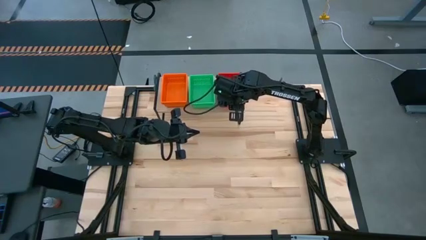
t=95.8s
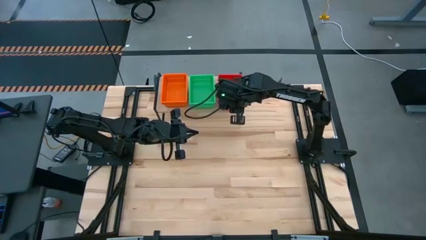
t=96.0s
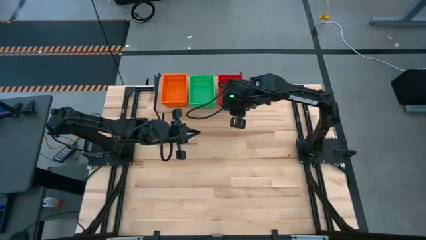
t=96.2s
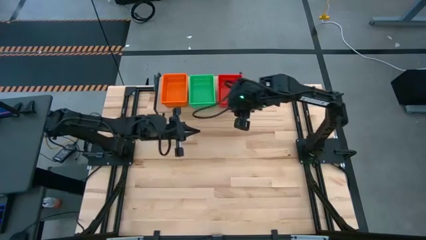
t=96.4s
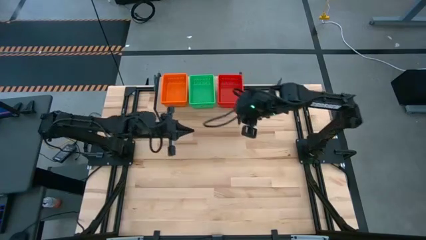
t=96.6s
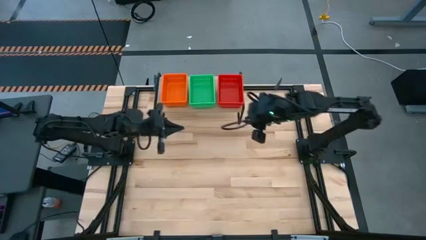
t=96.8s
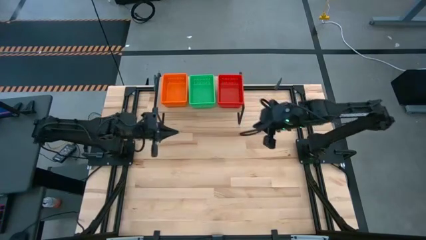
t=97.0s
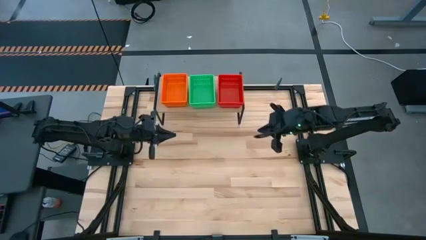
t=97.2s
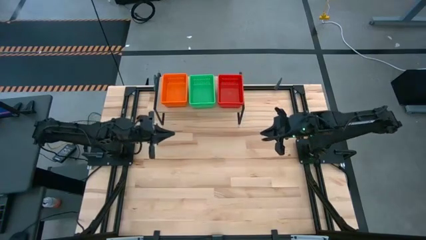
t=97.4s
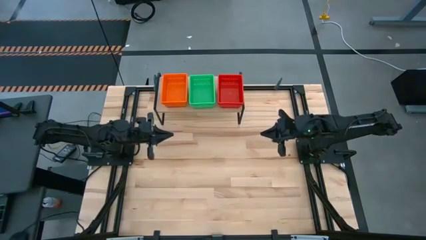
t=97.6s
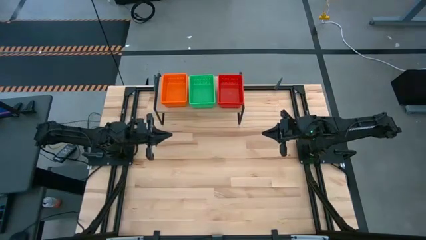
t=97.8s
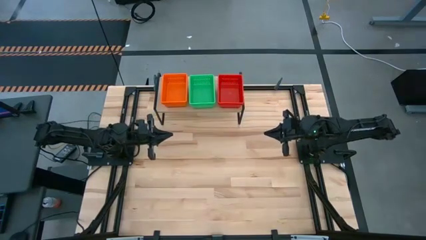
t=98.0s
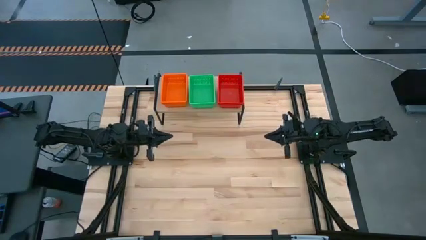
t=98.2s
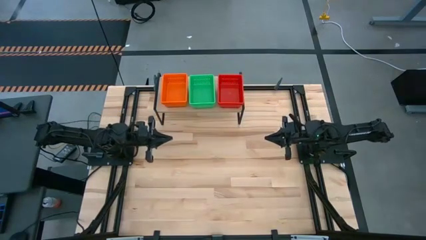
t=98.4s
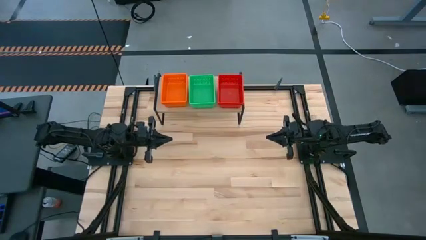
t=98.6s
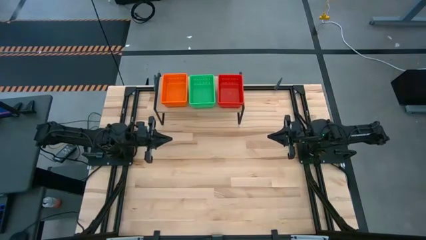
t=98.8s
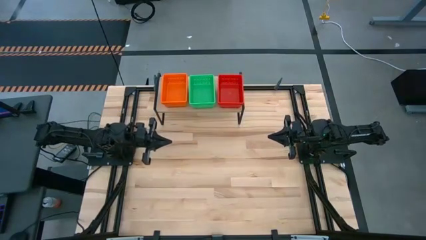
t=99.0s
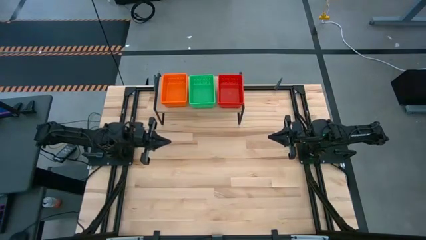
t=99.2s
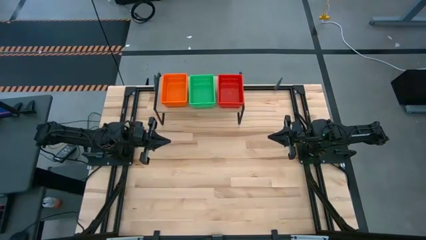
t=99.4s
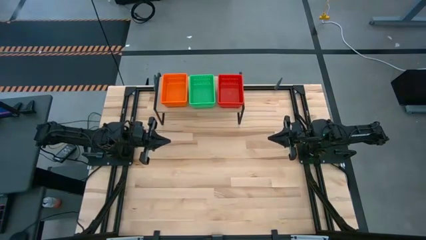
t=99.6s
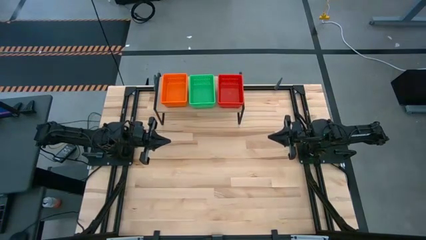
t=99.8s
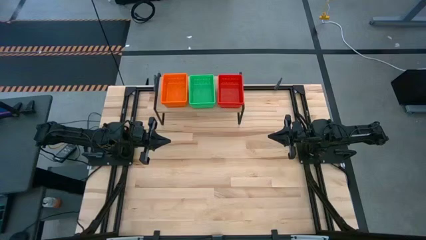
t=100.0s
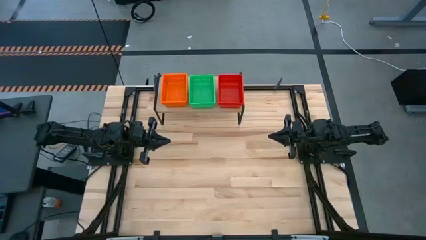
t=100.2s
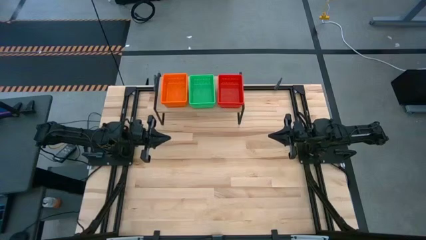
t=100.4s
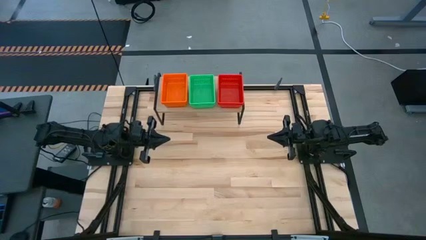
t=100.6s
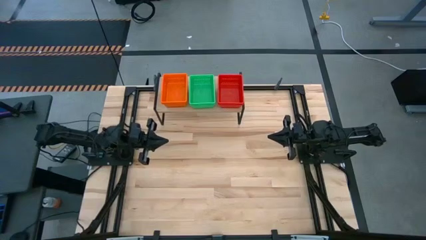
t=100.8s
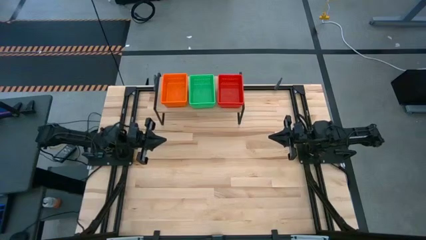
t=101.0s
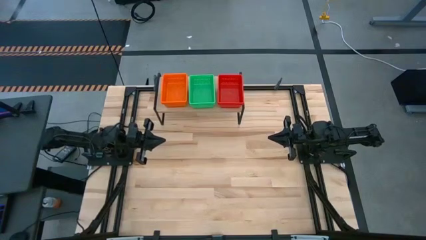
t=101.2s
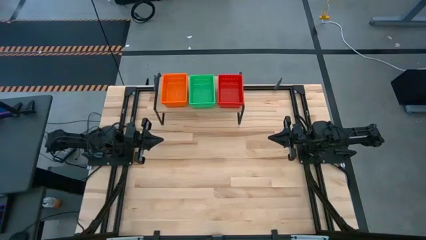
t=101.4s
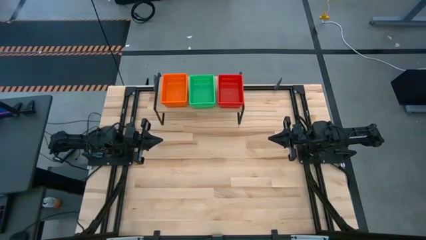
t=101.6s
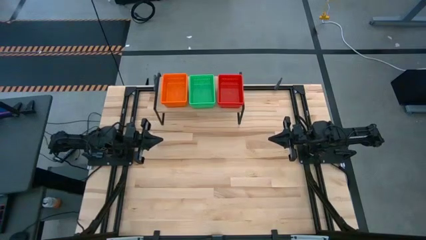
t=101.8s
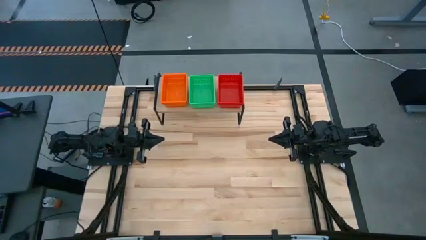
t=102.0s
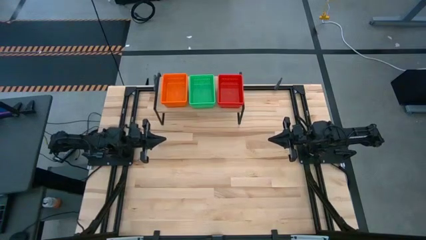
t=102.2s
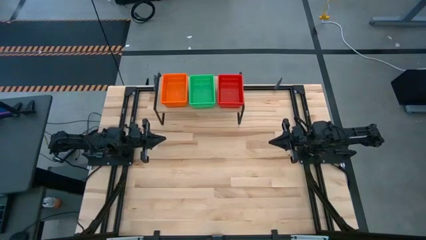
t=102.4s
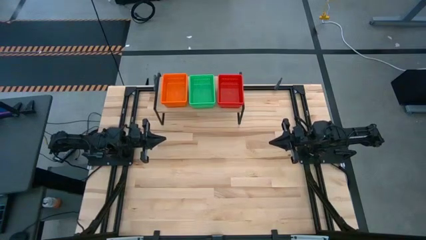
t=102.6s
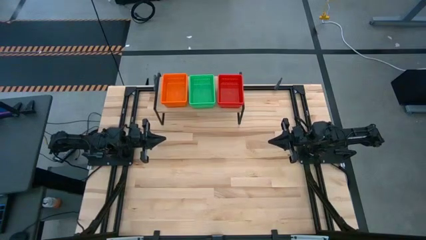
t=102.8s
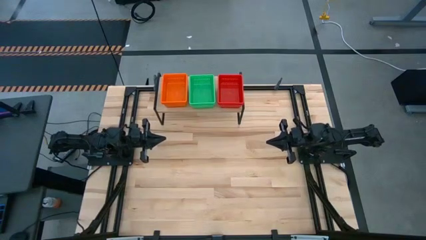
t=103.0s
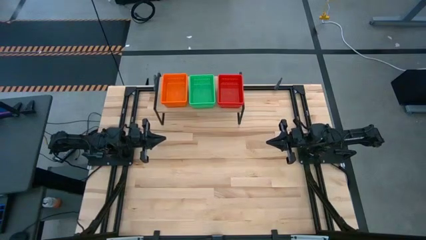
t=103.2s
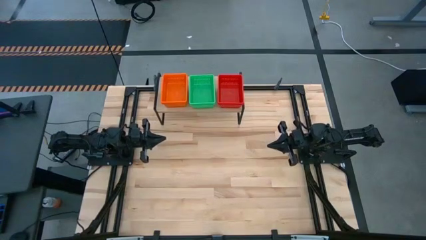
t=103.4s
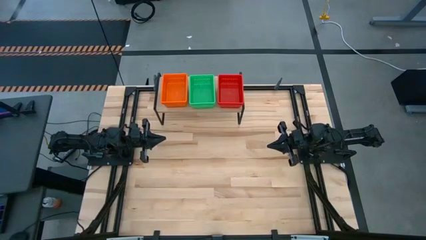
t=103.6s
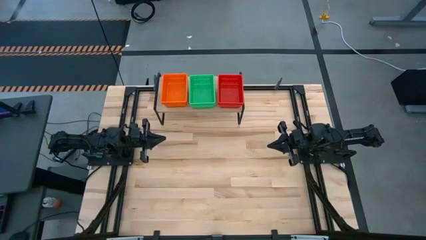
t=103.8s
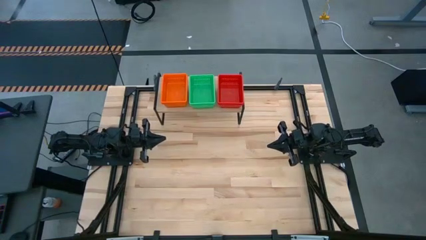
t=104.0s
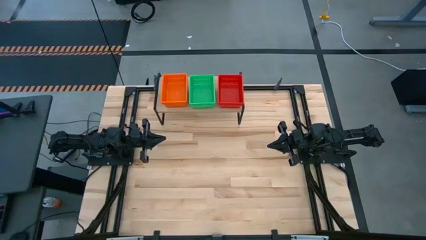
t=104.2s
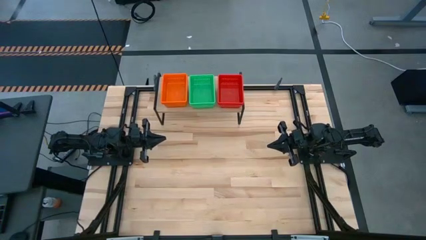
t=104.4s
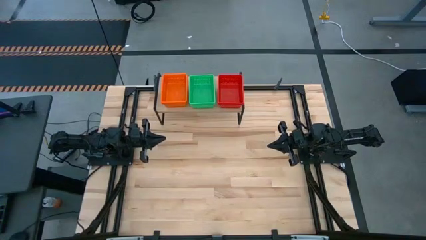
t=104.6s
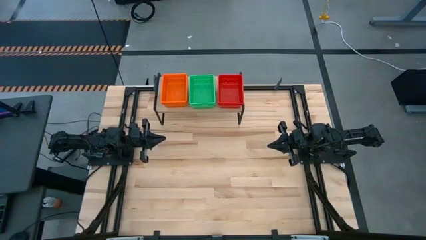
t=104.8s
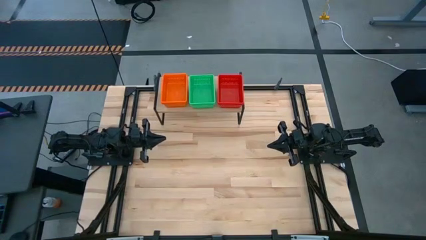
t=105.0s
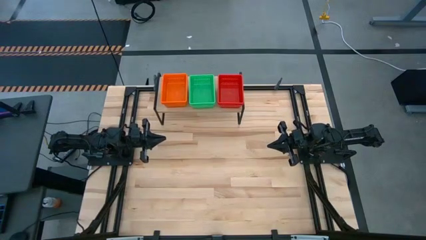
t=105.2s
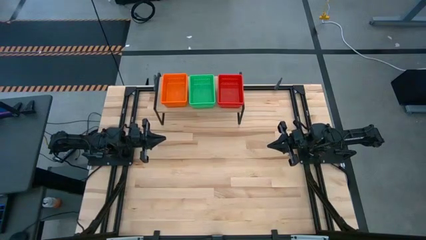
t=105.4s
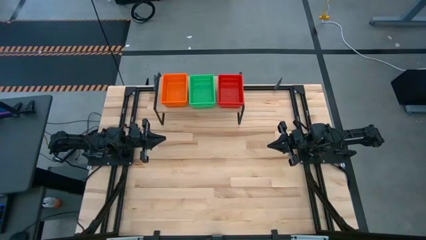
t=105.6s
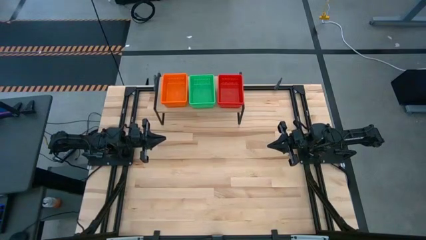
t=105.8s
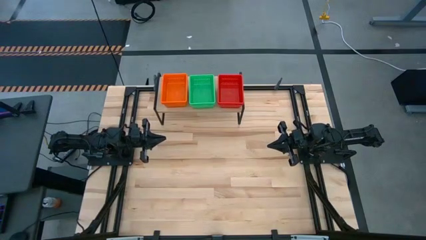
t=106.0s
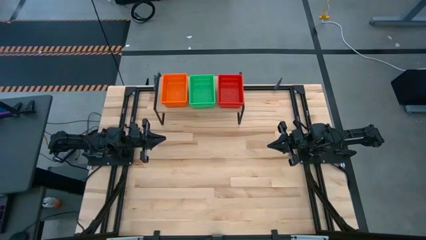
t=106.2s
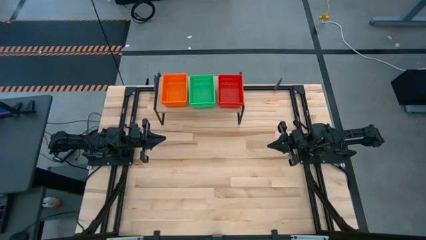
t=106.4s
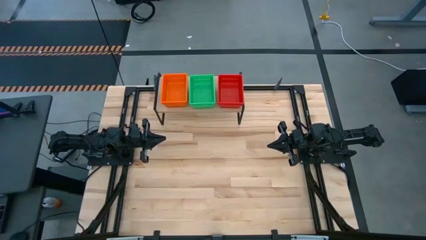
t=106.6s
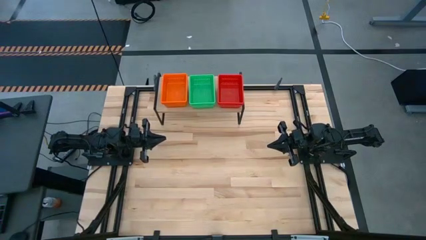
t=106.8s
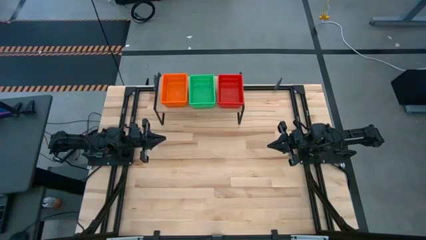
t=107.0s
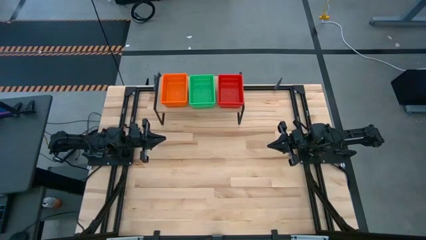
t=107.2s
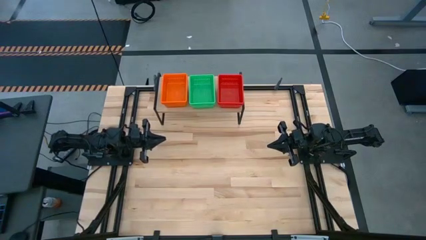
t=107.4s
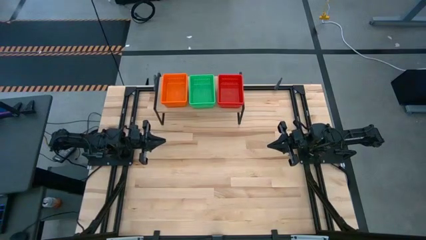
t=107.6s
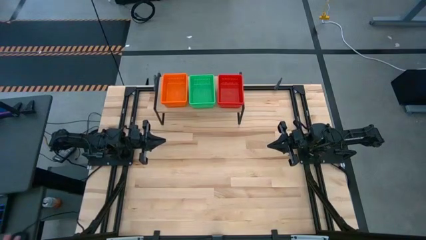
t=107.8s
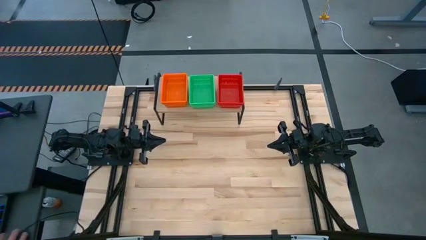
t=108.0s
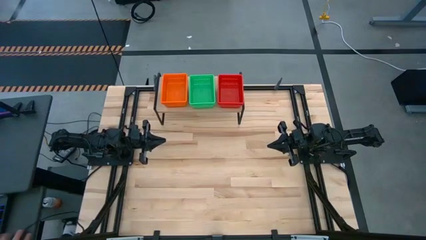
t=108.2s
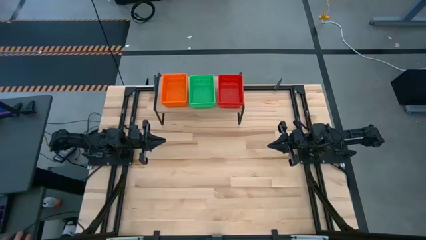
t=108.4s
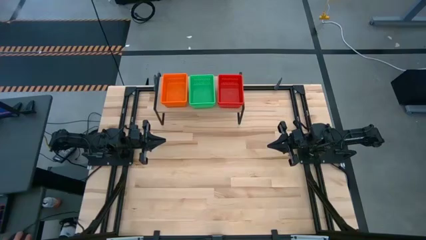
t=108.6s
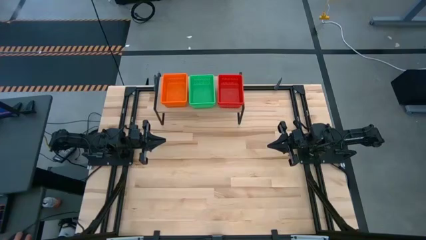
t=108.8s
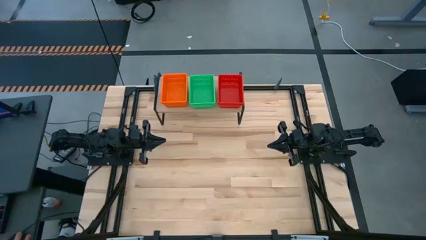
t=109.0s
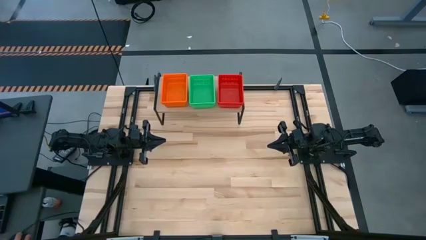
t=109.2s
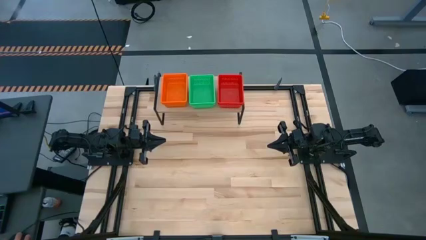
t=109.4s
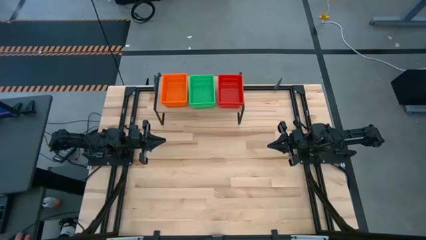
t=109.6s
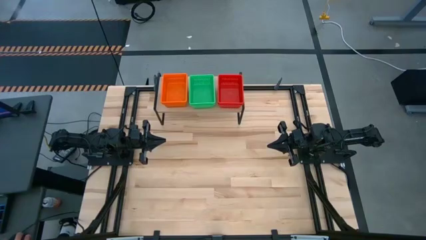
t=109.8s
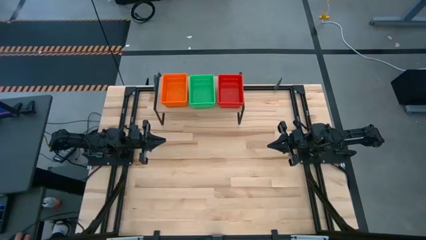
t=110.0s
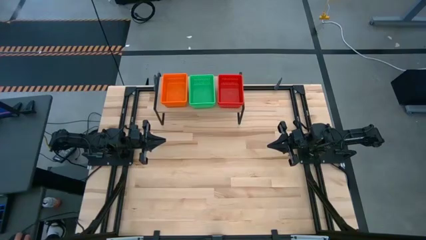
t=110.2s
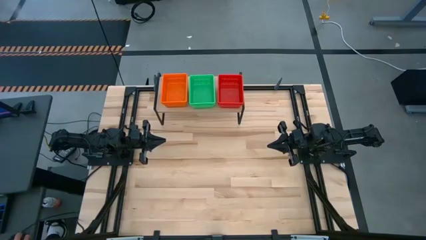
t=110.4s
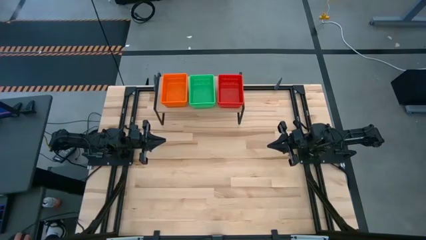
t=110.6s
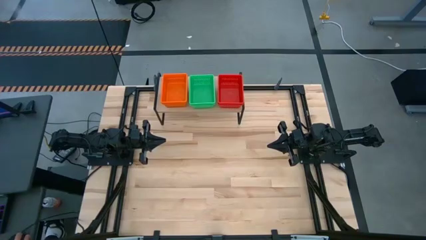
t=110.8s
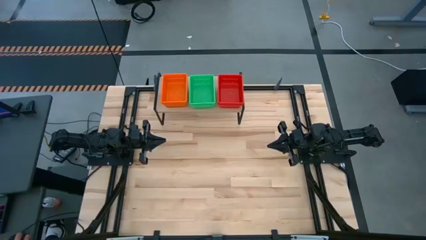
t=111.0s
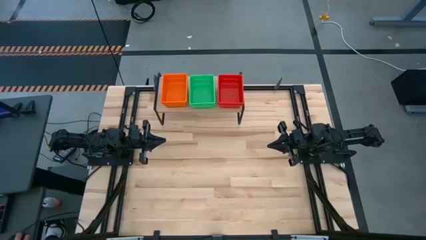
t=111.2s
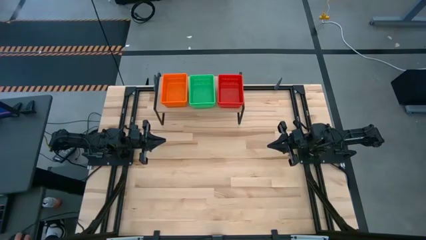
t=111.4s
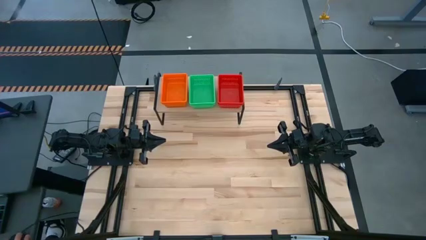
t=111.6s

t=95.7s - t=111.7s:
Task: Stack baskets on shelf by color
Return to Home Position
